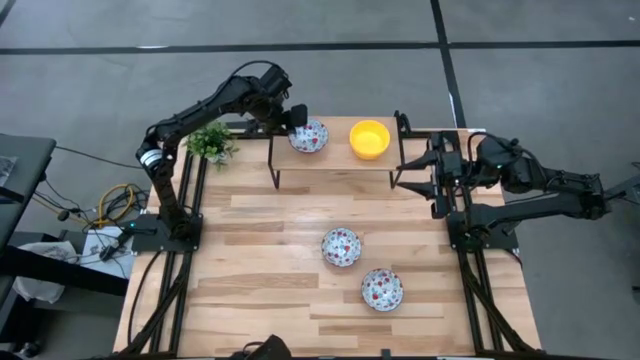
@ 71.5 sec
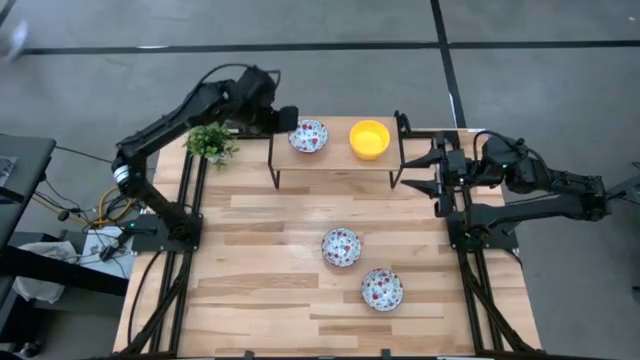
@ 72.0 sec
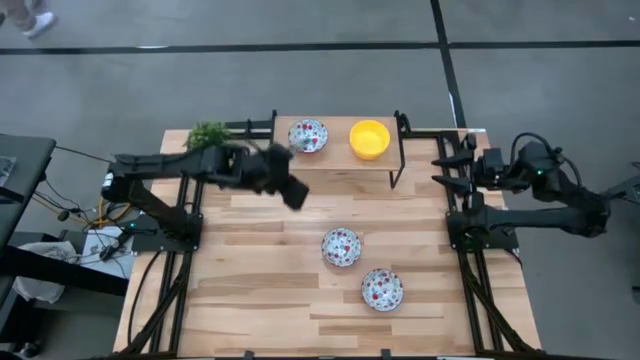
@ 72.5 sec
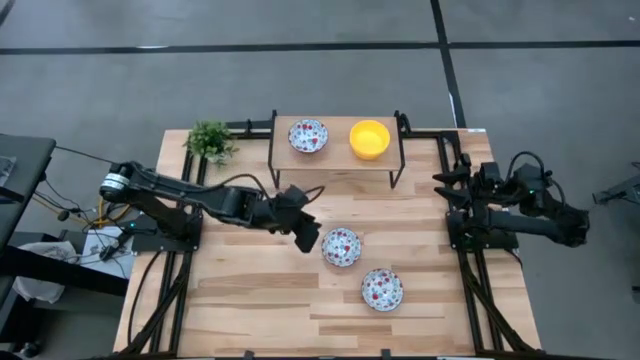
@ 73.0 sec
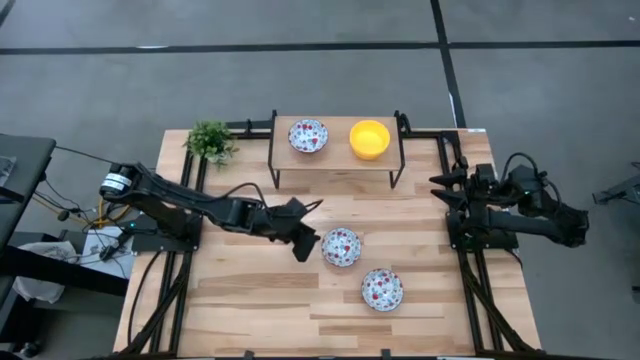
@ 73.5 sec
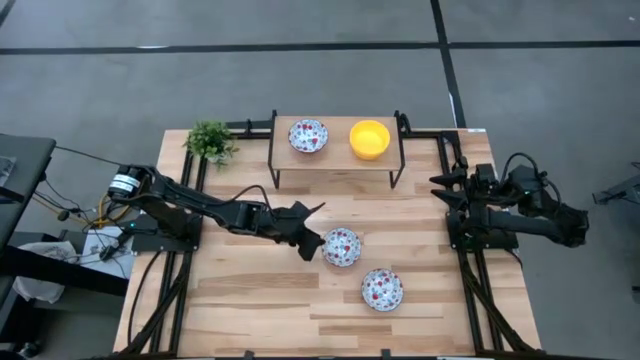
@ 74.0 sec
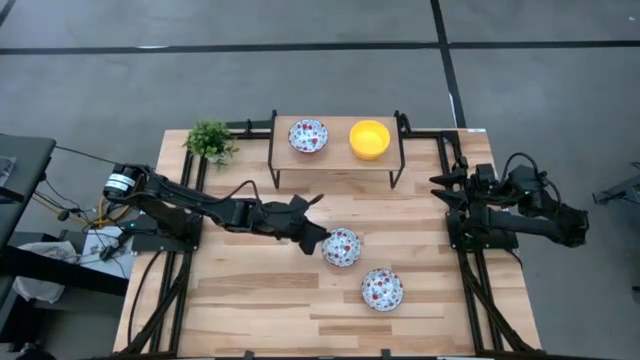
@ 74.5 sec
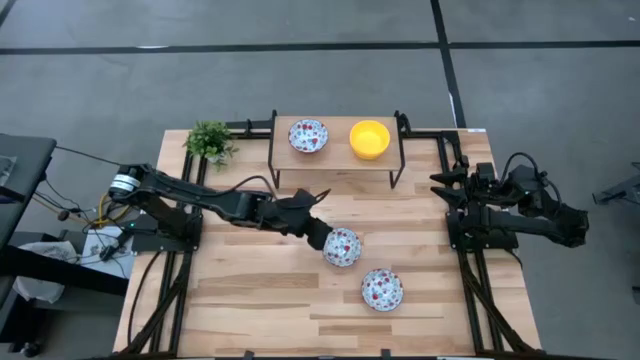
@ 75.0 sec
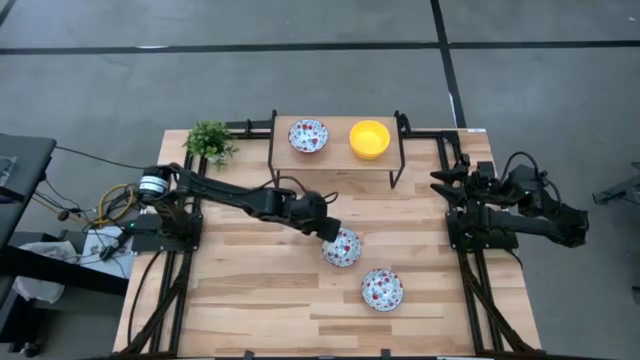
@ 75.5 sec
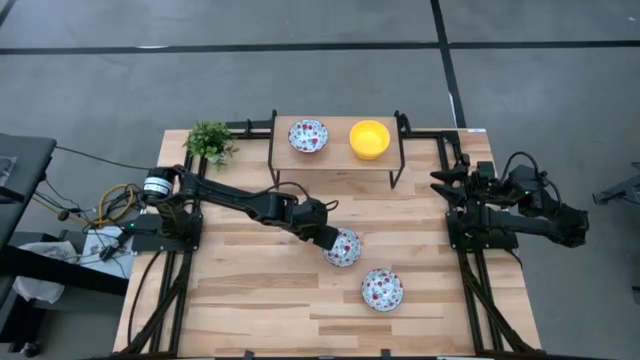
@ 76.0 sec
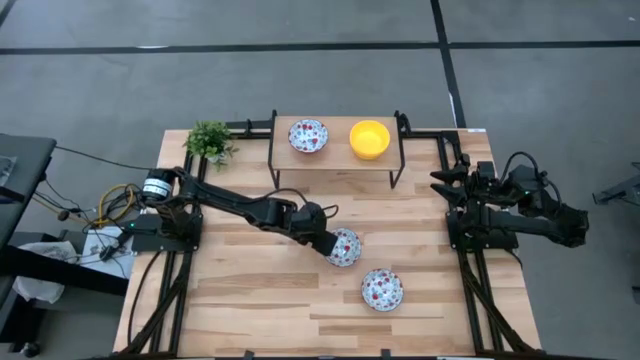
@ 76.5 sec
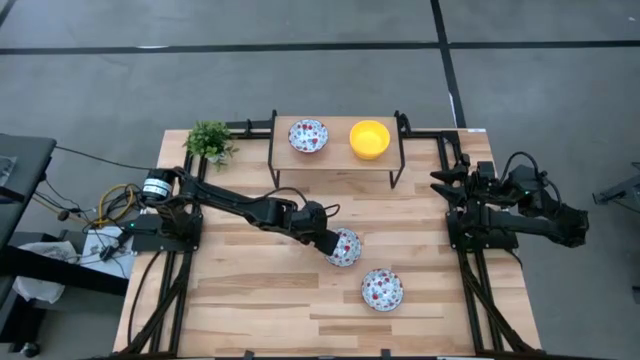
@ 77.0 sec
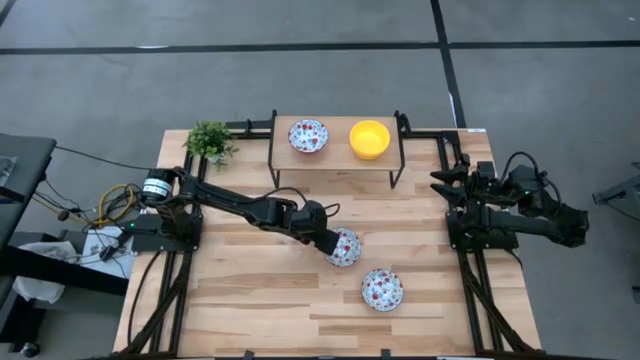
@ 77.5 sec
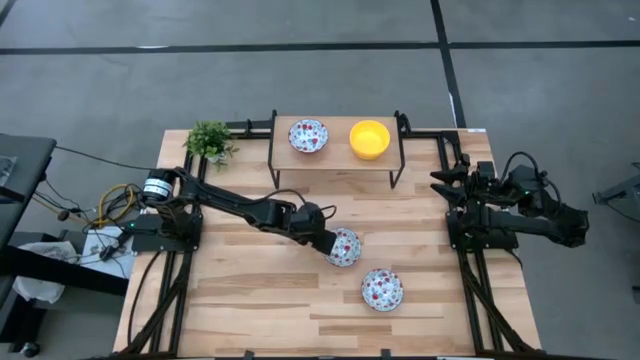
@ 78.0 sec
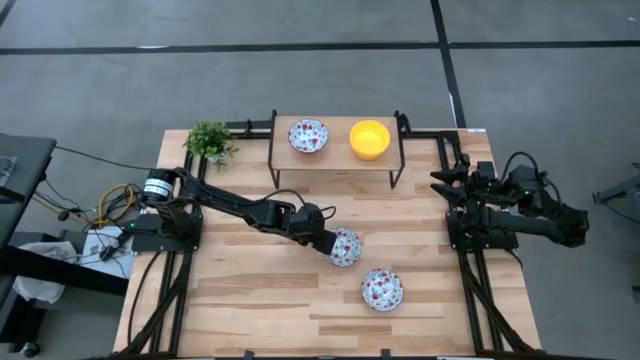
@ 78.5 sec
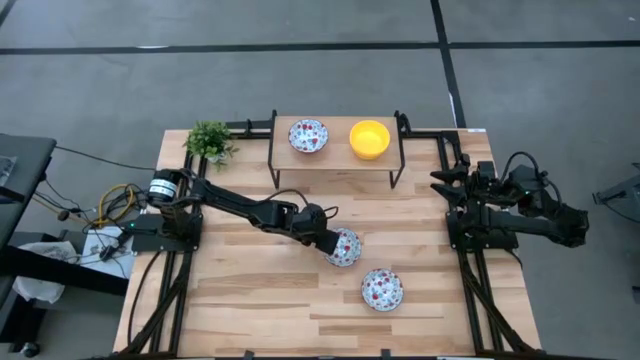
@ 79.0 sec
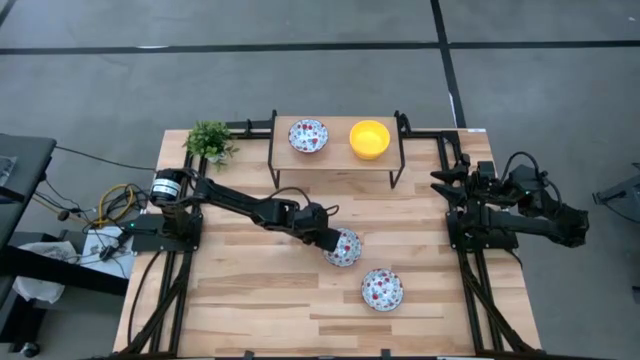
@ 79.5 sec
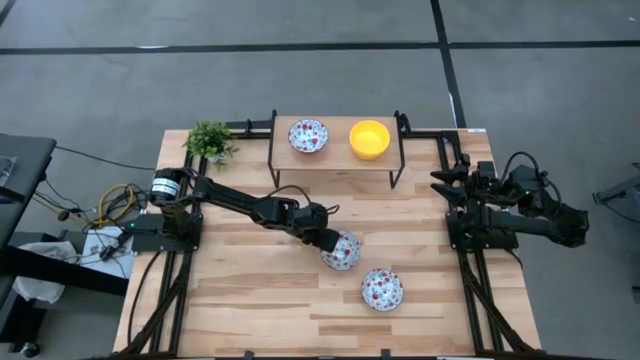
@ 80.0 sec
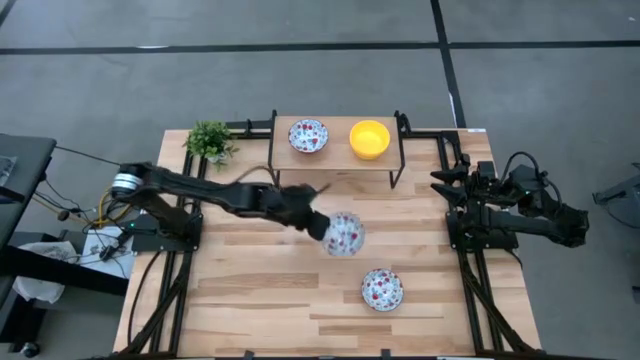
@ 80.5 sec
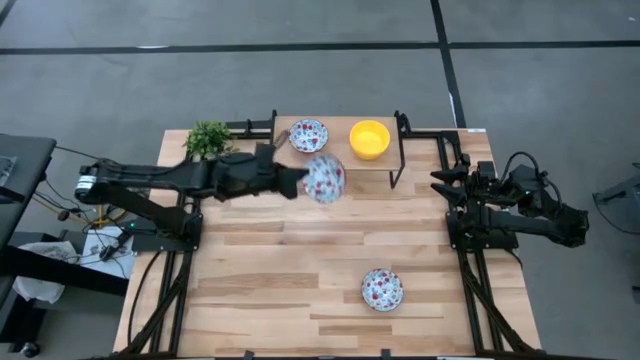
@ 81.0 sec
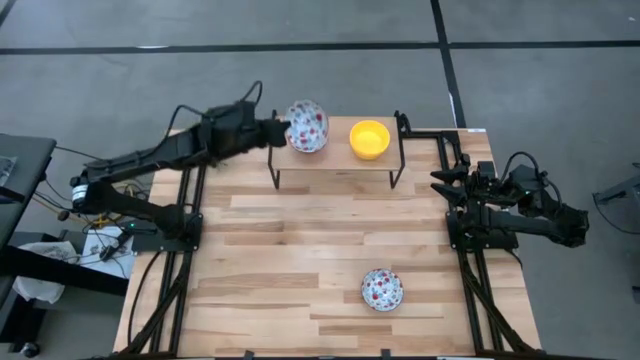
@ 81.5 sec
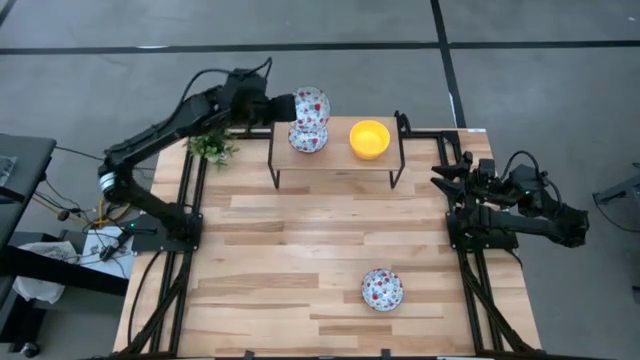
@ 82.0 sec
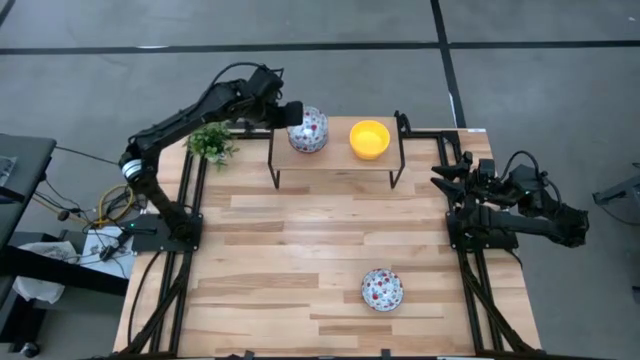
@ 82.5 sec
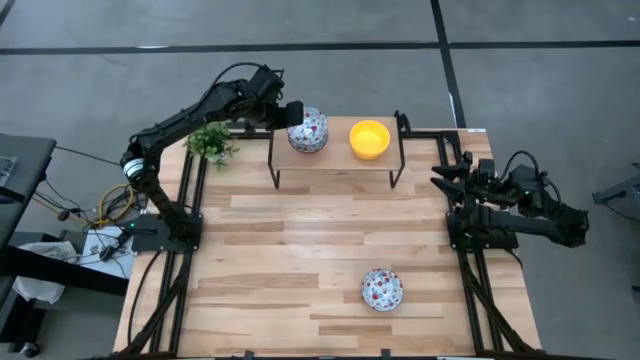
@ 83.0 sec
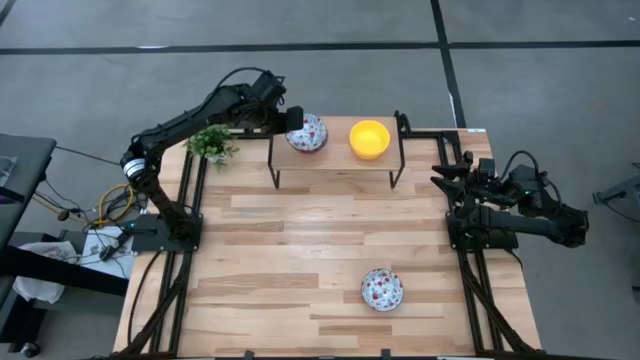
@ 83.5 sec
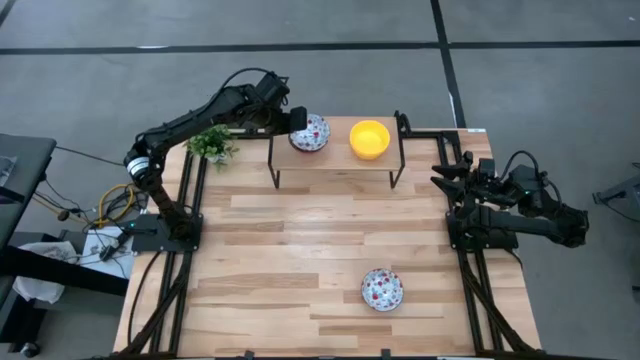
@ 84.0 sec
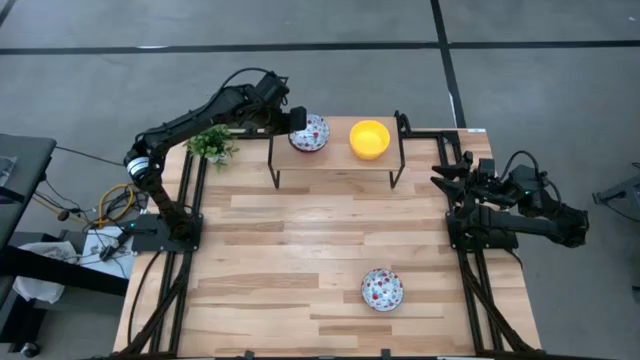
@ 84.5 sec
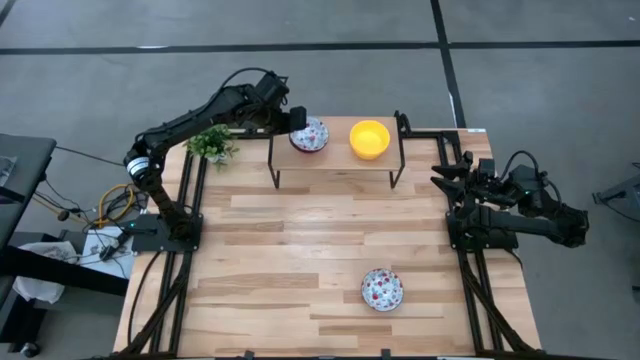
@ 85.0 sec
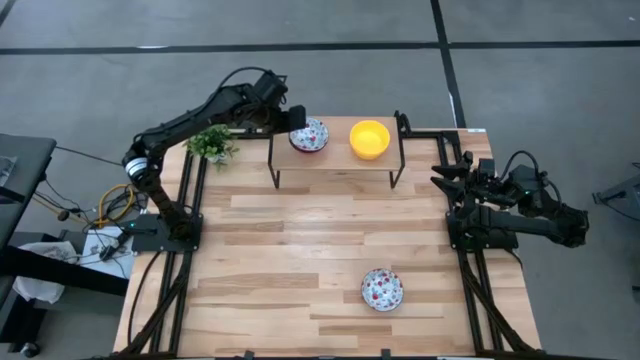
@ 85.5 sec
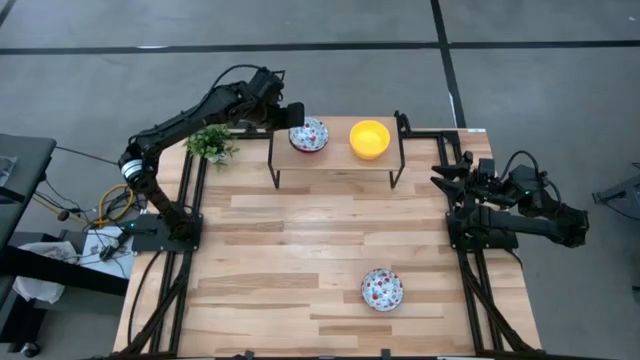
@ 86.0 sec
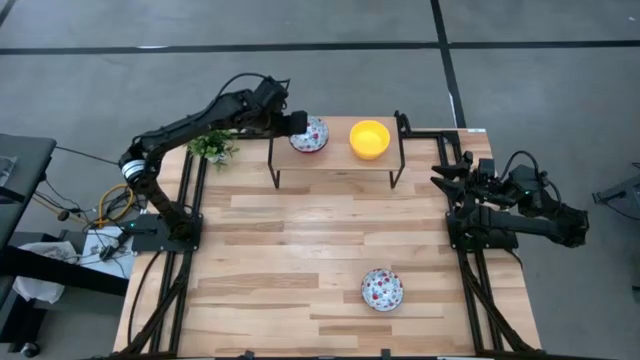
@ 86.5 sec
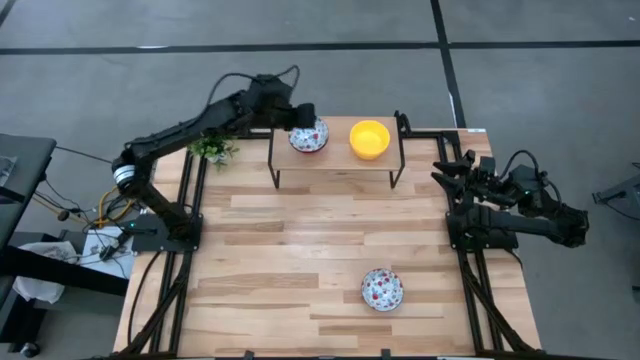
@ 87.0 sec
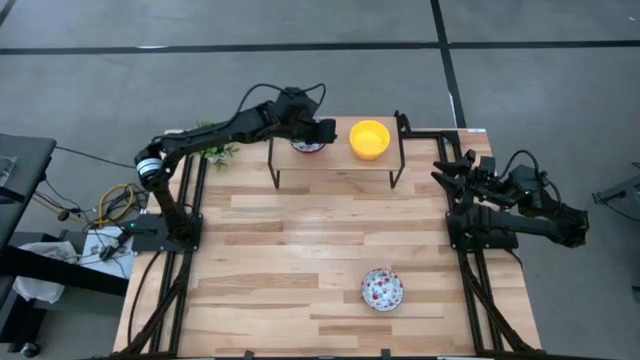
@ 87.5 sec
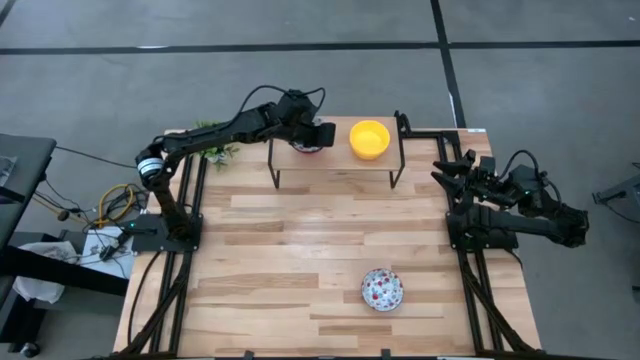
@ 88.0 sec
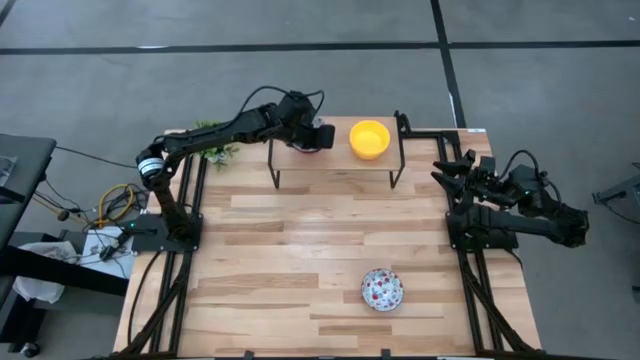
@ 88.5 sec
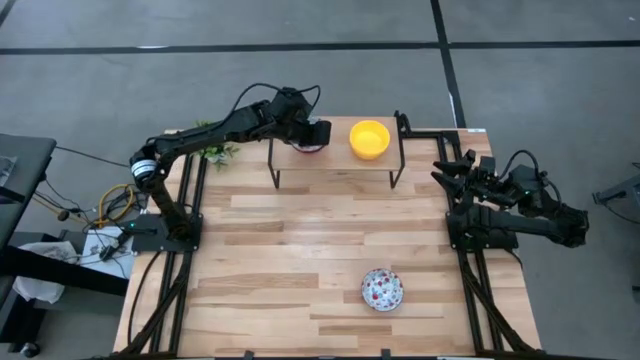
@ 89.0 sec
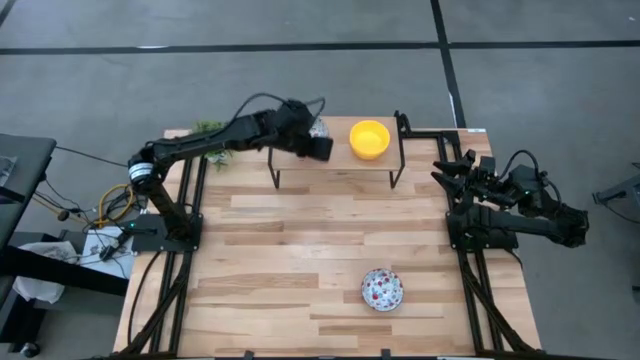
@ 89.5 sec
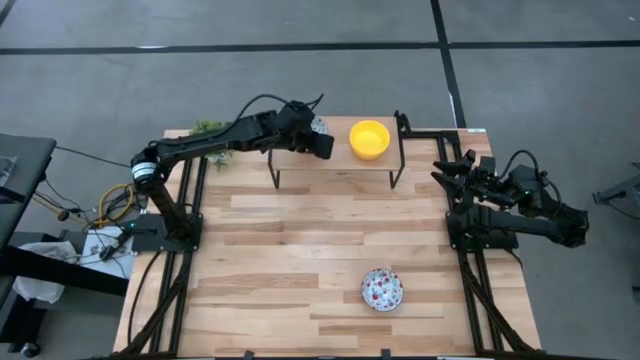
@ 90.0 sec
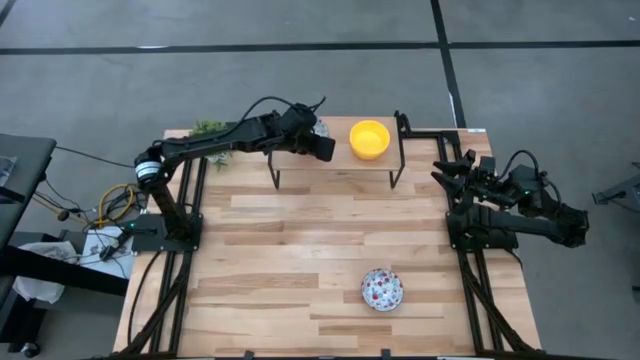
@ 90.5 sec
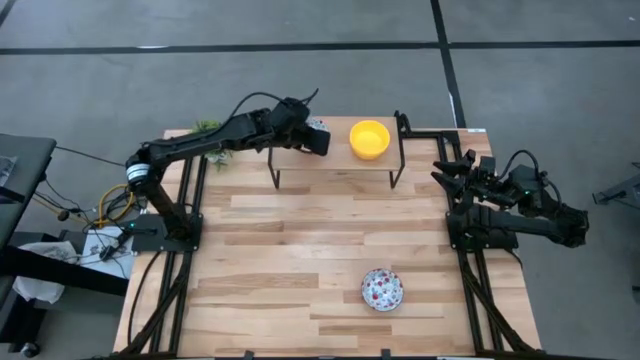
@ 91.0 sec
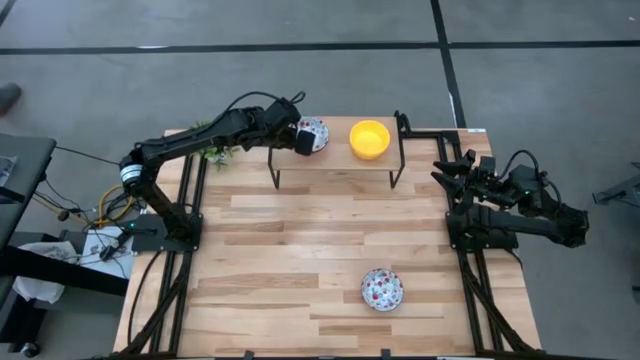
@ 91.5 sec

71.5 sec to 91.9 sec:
Task: Pick & Place Mini bowls
Stack the top orange bowl on the orange bowl on the shelf
